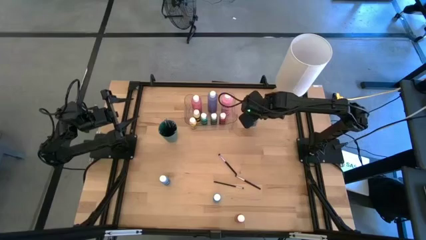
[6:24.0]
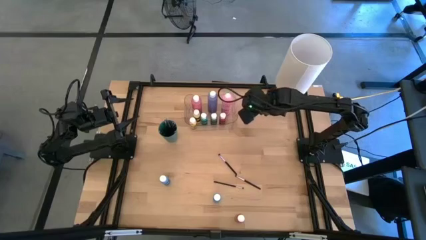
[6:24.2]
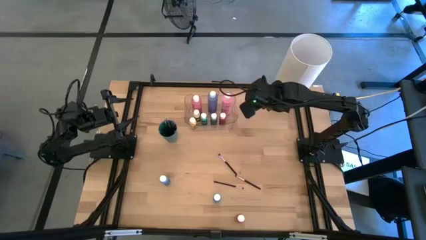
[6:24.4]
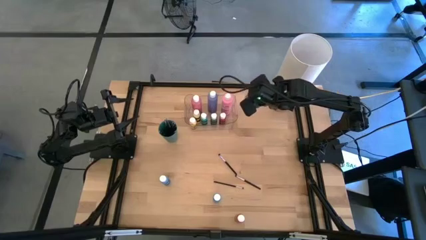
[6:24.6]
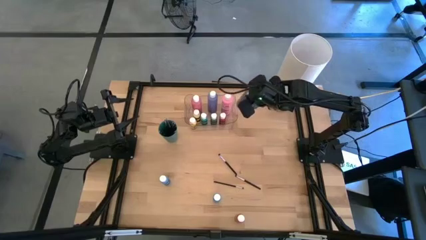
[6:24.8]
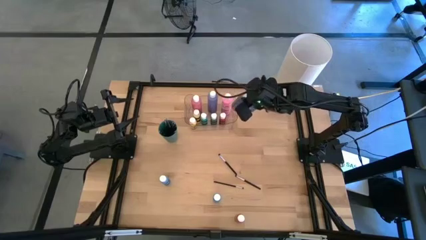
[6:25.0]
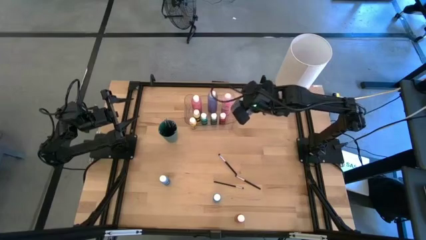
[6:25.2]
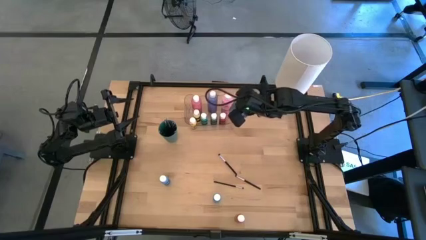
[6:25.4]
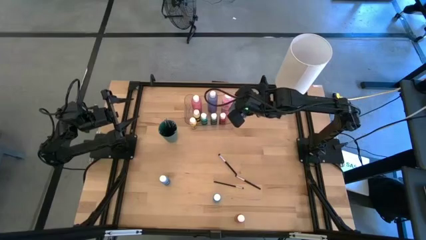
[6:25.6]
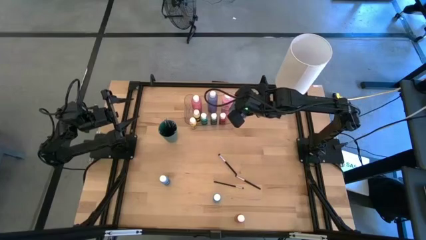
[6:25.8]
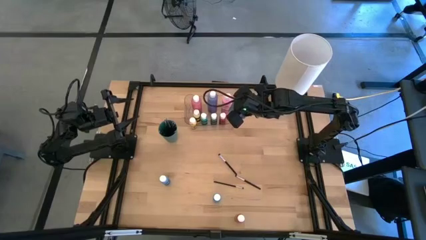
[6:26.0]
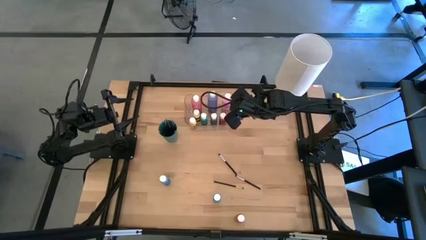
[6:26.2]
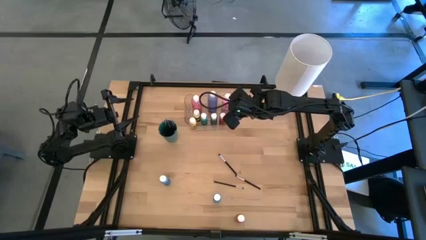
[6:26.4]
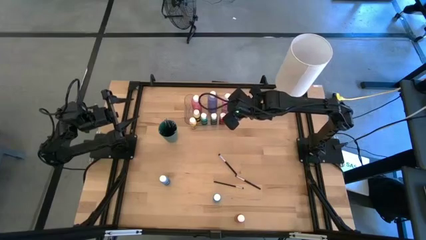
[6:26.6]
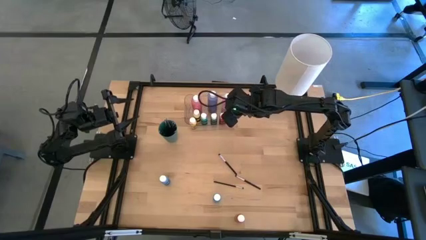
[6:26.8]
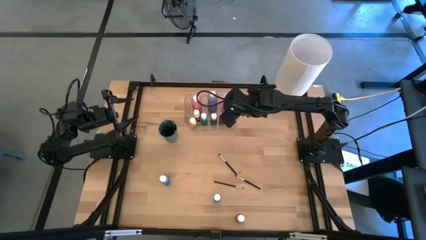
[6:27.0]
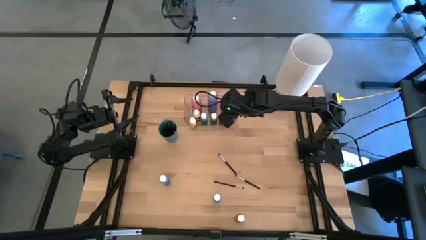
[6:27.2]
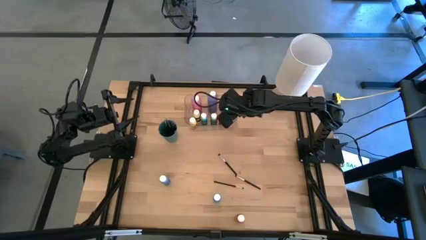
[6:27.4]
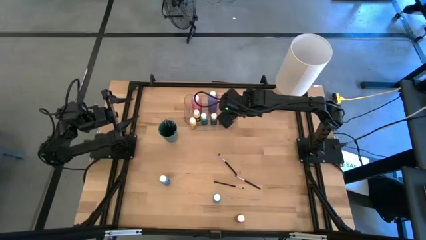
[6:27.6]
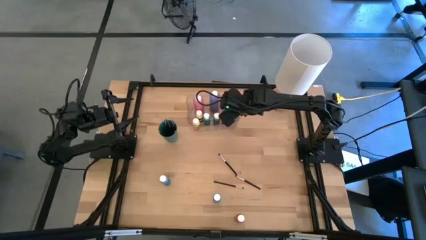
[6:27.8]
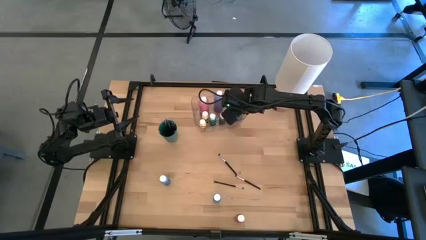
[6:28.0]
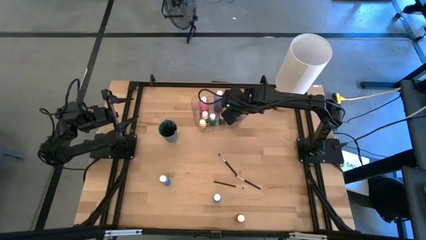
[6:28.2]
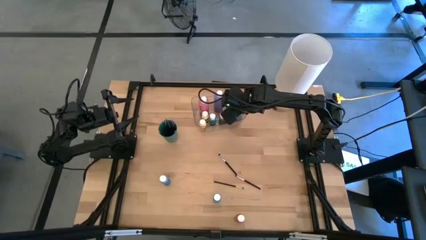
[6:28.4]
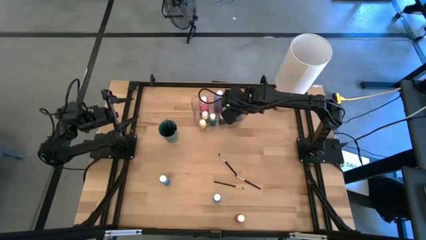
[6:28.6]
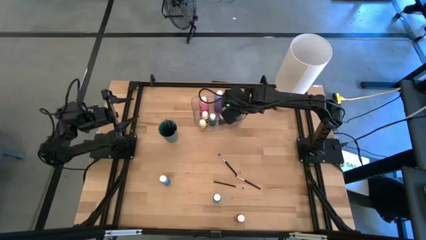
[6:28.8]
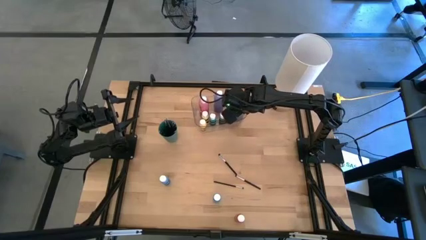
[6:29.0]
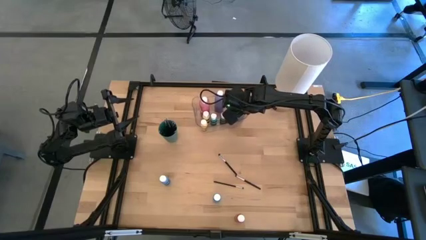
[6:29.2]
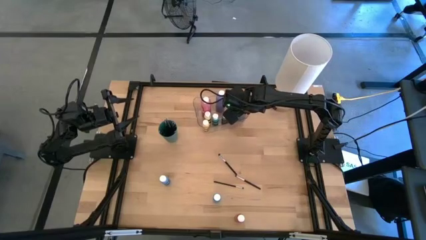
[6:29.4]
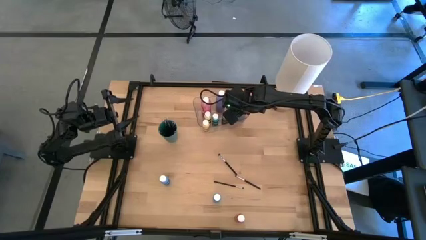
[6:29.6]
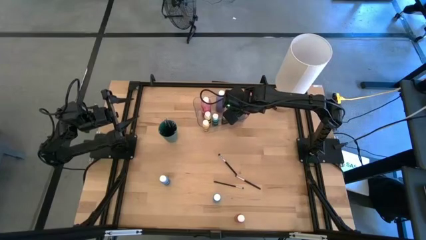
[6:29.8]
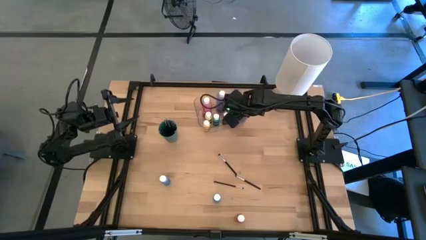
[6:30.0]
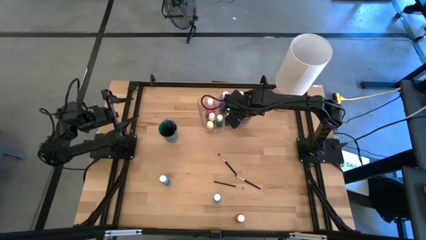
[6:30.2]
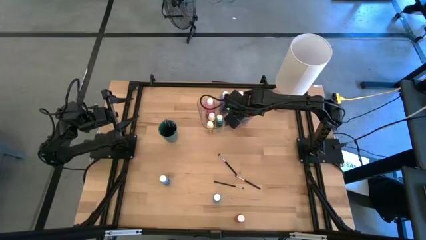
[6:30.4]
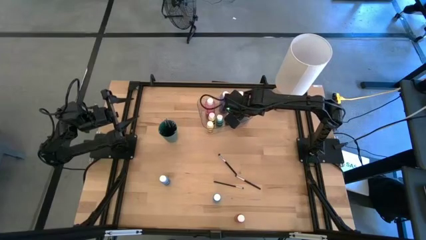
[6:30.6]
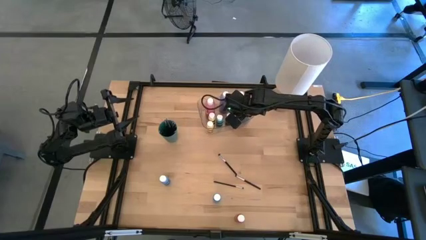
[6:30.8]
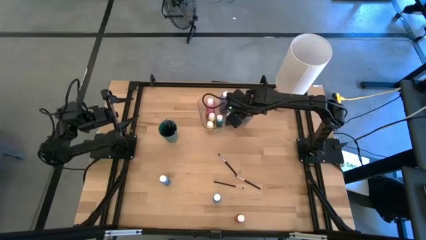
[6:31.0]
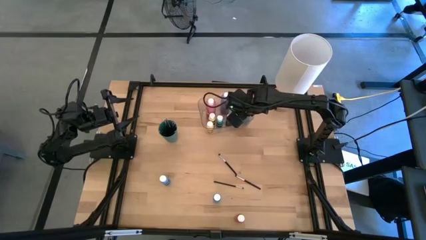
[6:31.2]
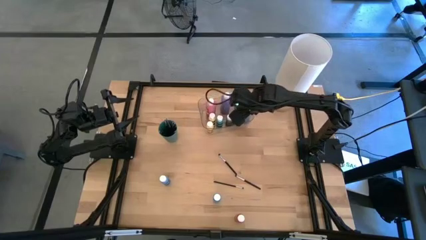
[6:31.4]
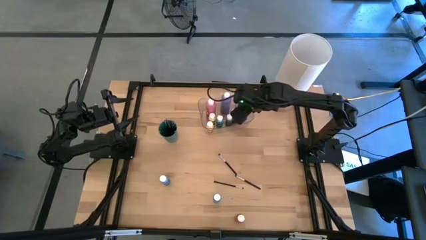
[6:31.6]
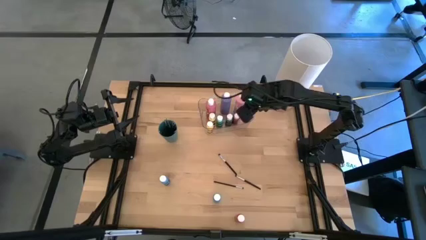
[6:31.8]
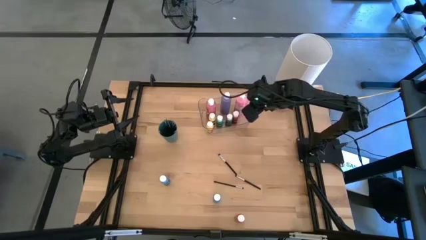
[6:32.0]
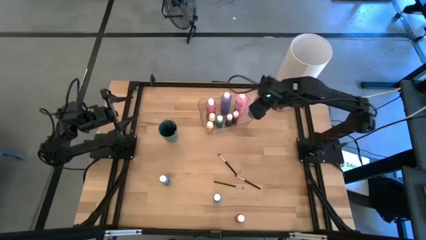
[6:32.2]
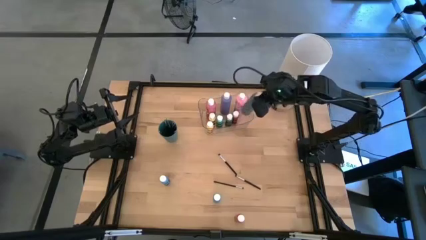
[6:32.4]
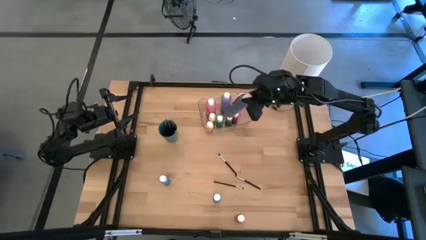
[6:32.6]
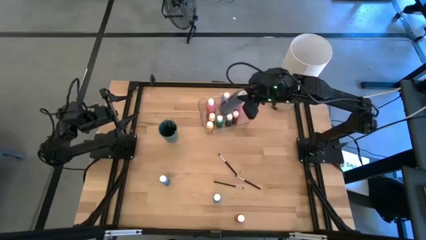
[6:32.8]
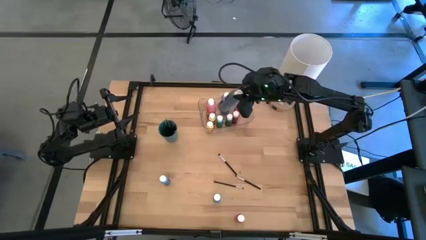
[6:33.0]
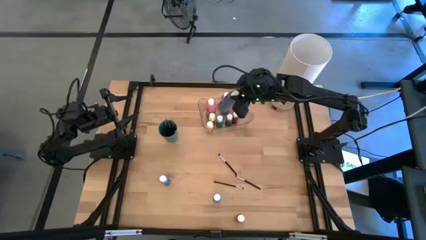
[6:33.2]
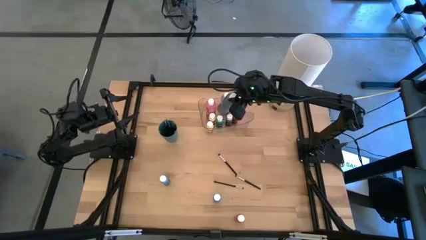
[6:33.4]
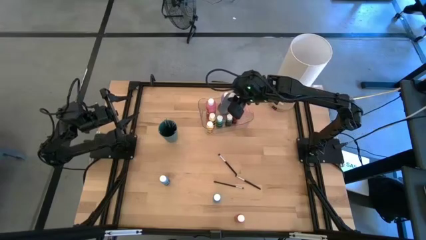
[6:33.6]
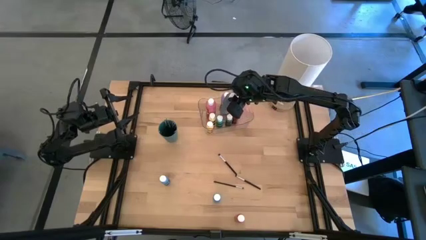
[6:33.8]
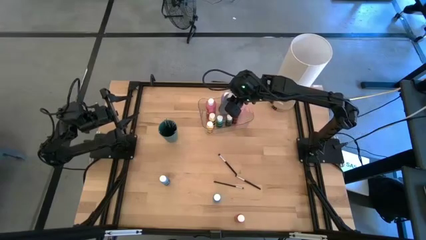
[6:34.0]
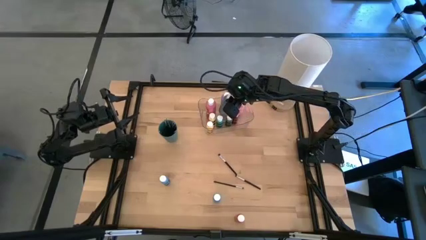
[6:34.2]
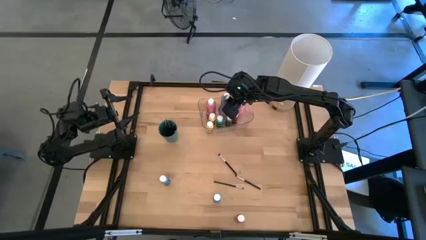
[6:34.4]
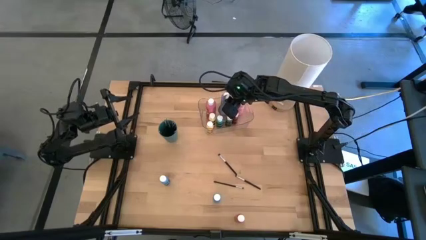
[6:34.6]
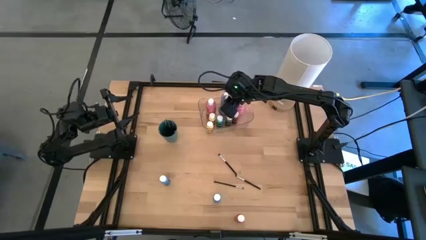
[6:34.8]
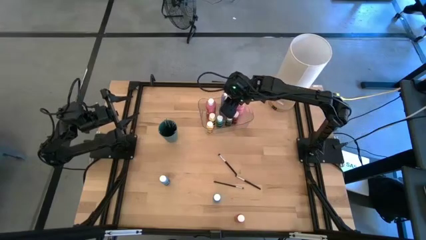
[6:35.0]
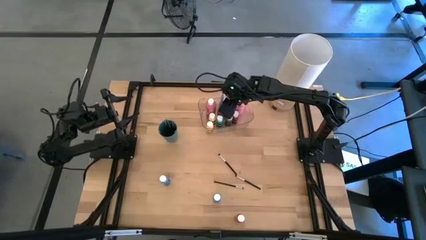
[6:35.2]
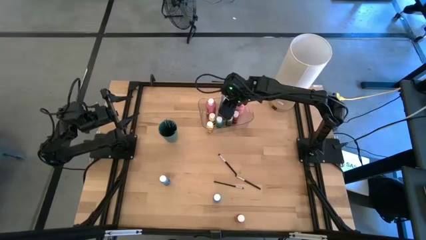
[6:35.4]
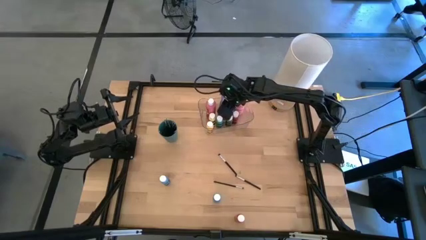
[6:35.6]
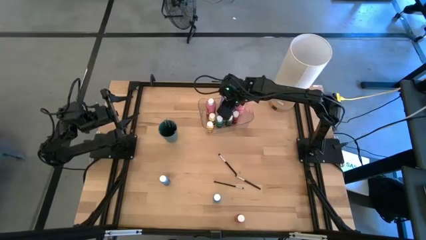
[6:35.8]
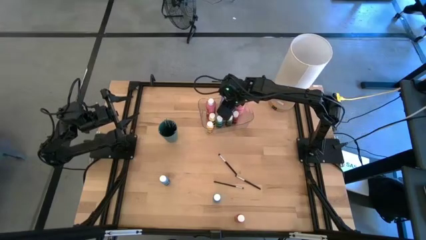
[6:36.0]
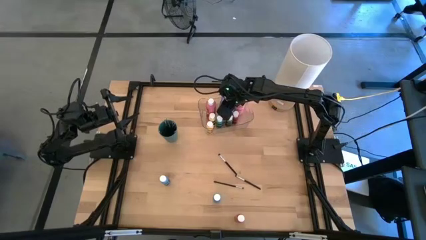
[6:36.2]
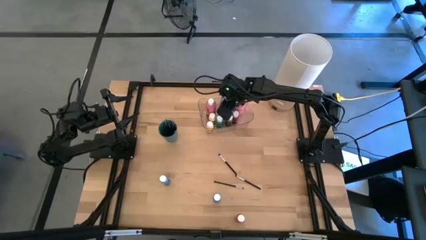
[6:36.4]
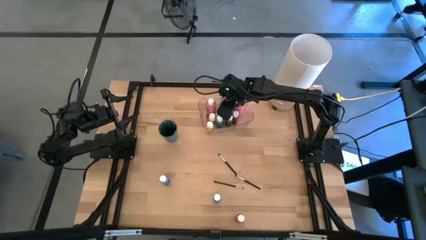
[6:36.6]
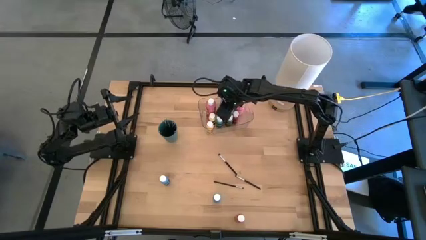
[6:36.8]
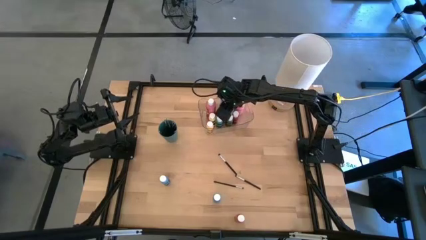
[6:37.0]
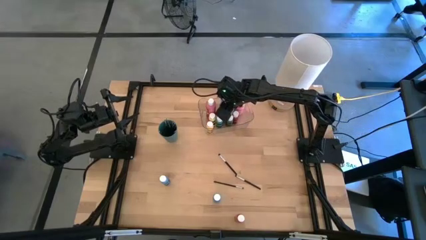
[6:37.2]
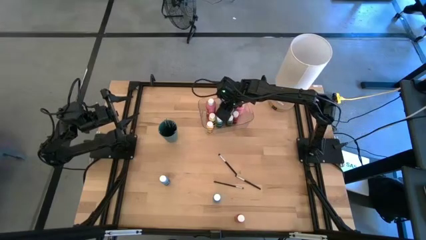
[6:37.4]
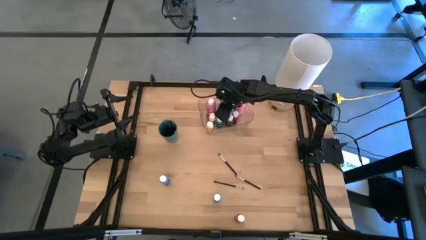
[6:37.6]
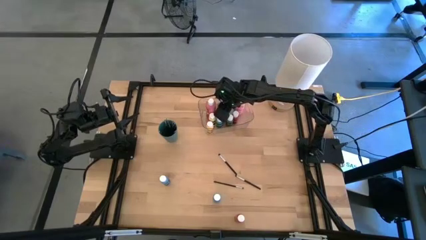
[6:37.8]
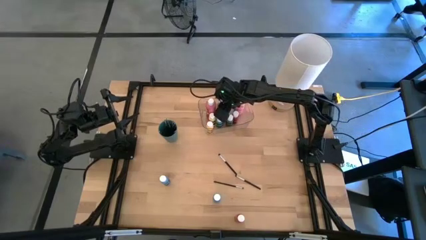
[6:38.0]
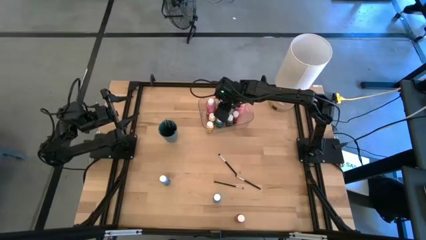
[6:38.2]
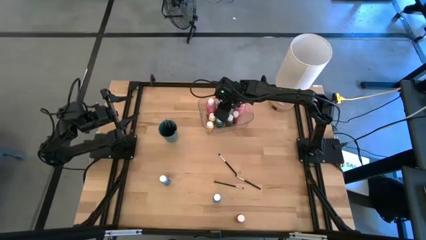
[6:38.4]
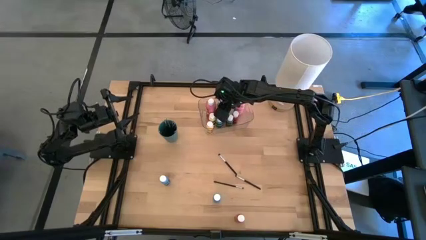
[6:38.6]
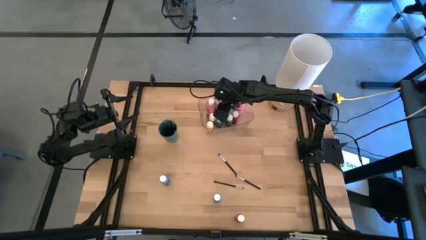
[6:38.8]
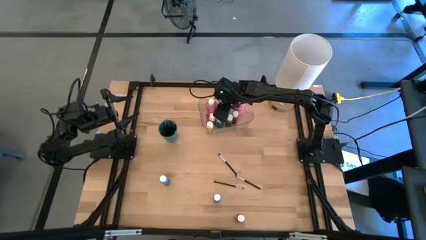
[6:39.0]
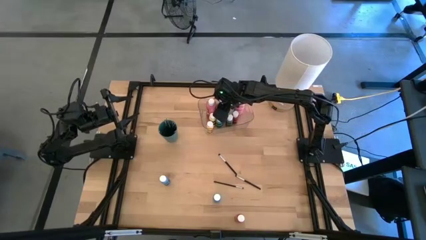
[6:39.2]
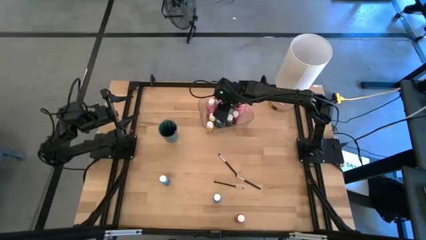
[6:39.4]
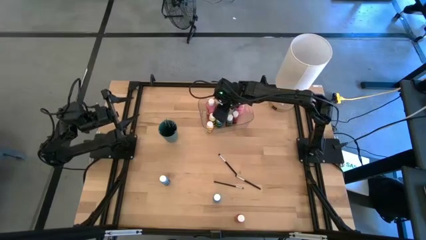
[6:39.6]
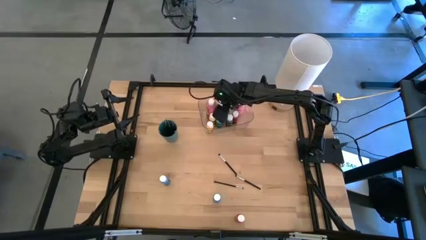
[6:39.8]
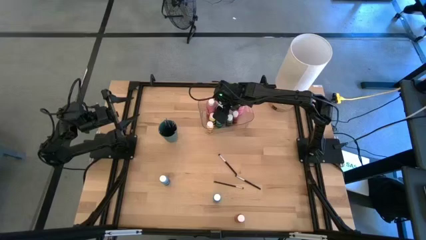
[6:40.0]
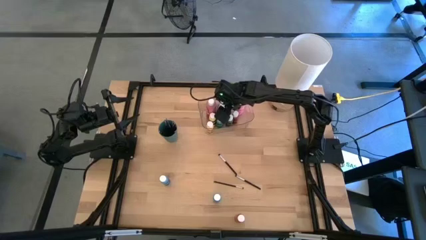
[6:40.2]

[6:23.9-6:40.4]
Task: Pick & Place Paint Supplies
Put the gray paint bottle into the transparent bin

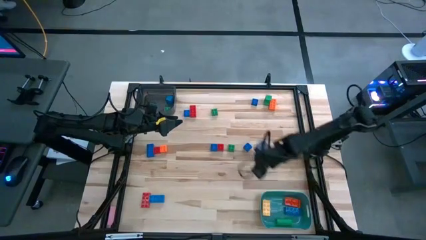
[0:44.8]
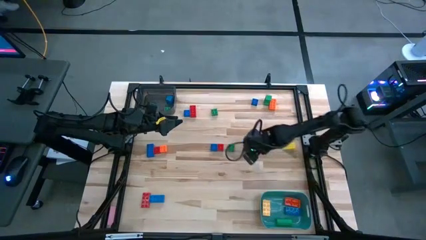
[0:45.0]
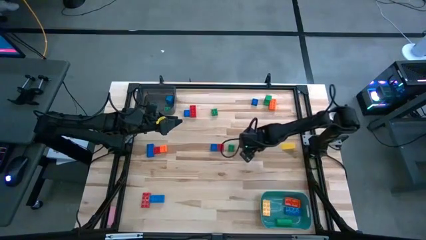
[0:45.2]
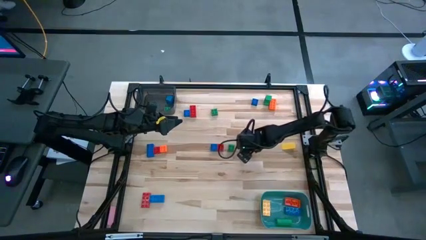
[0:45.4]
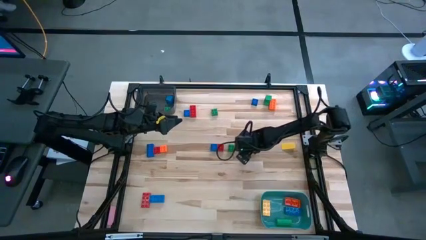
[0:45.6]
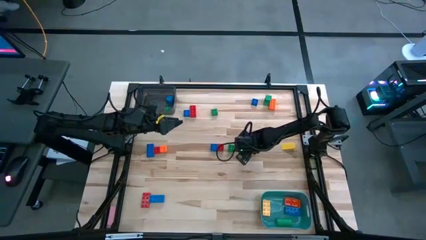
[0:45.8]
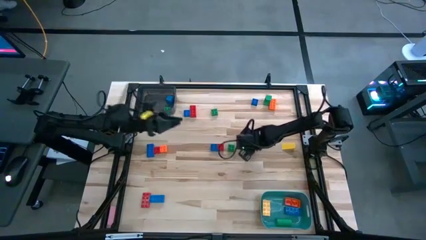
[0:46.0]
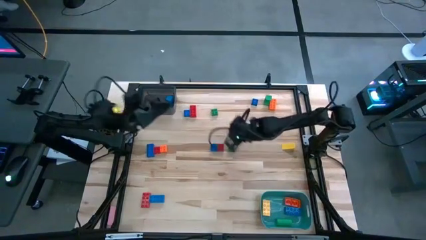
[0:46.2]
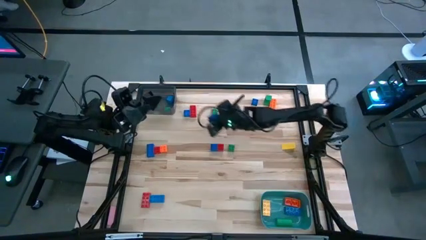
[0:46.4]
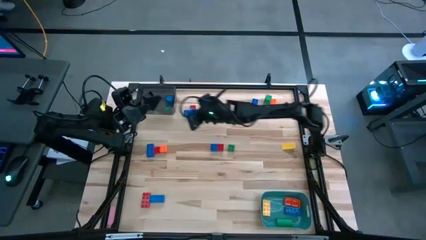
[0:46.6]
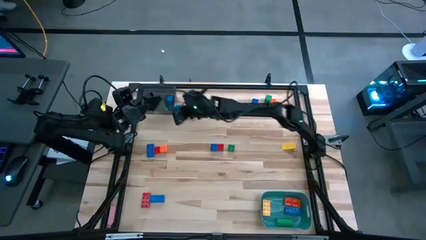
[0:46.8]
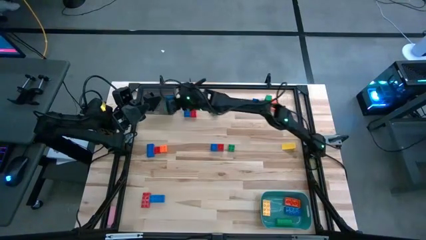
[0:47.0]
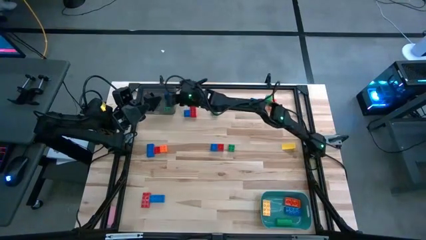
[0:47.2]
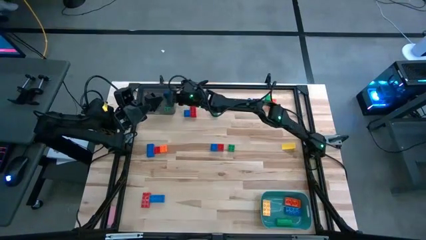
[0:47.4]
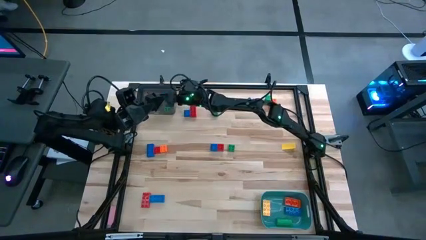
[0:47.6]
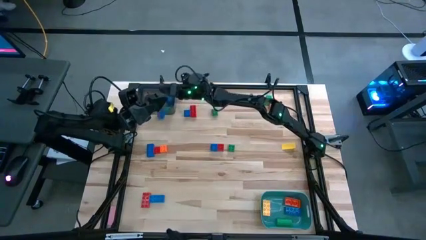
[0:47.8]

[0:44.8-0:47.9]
Task: Sort blocks by size
Put the bottom right blue game piece into the black bin
